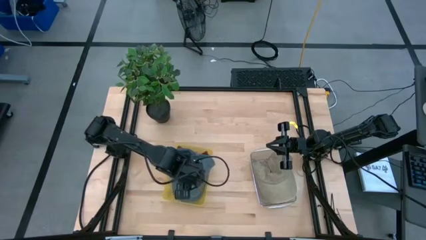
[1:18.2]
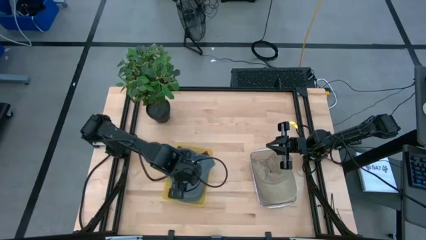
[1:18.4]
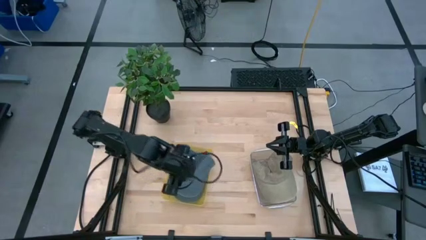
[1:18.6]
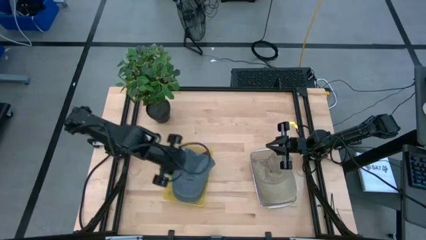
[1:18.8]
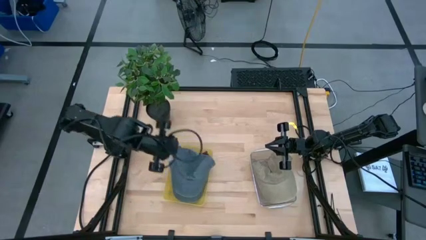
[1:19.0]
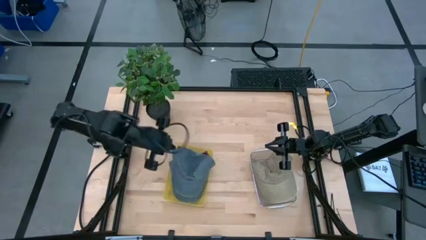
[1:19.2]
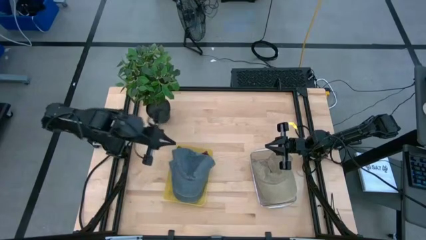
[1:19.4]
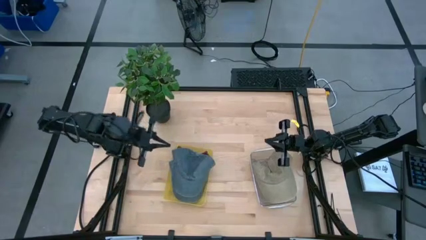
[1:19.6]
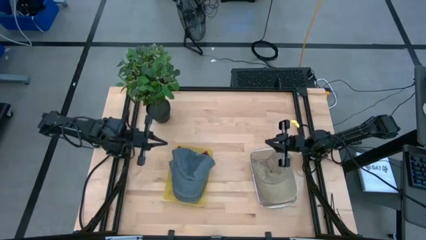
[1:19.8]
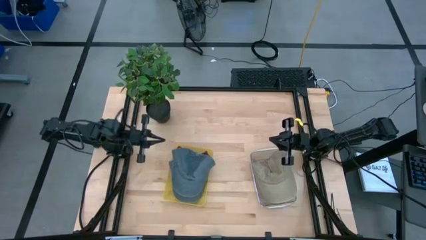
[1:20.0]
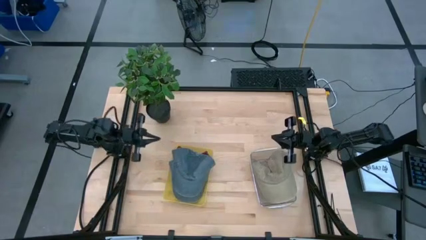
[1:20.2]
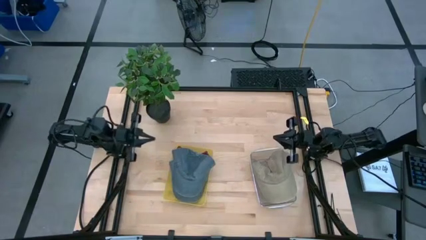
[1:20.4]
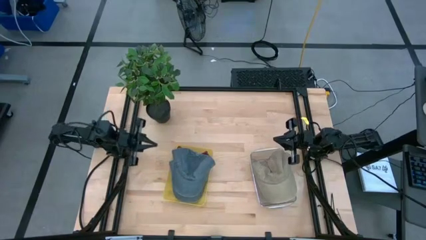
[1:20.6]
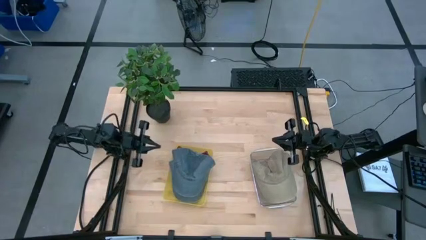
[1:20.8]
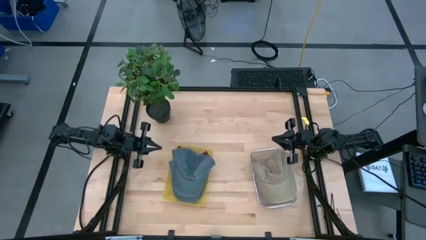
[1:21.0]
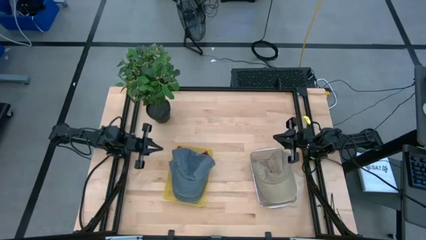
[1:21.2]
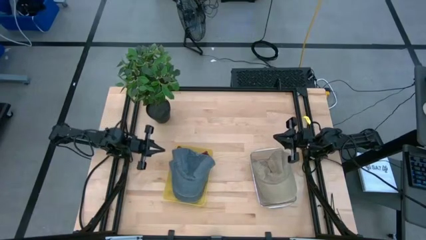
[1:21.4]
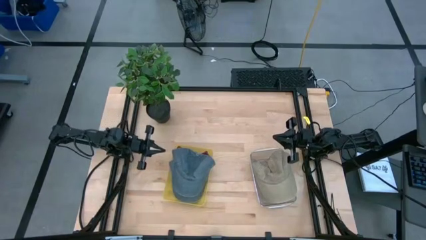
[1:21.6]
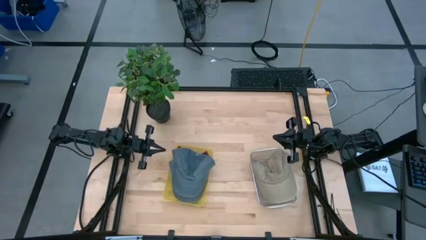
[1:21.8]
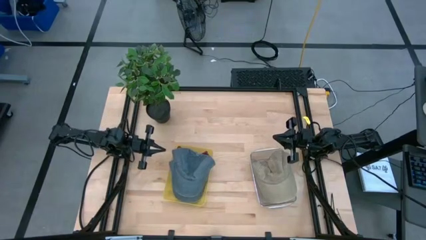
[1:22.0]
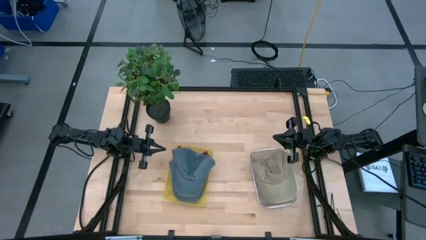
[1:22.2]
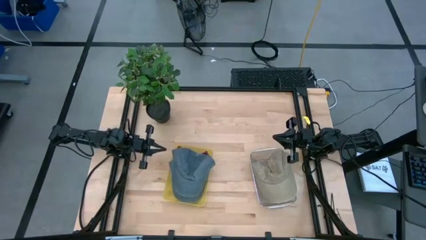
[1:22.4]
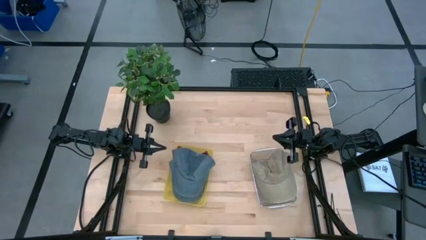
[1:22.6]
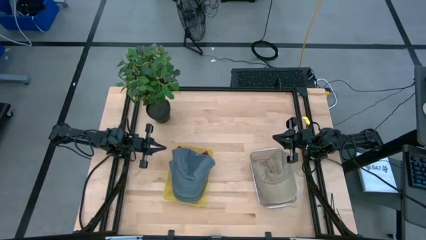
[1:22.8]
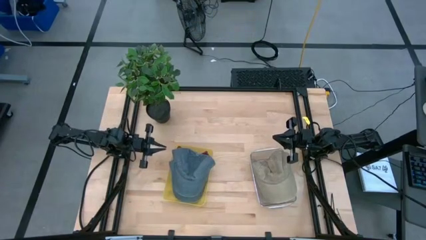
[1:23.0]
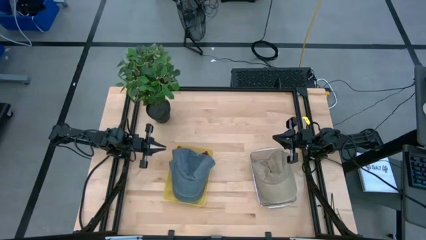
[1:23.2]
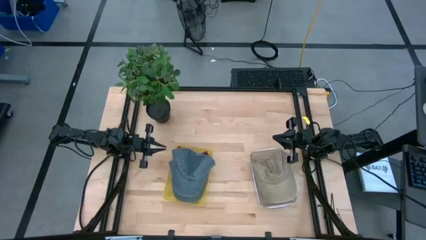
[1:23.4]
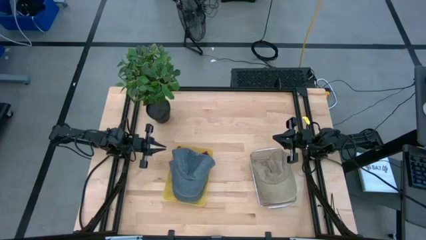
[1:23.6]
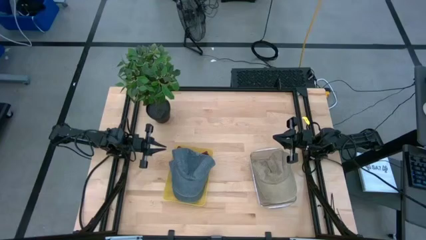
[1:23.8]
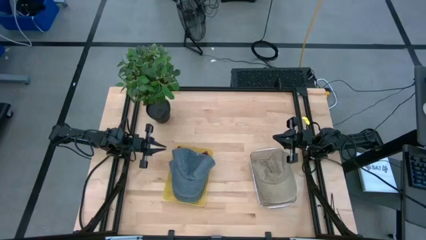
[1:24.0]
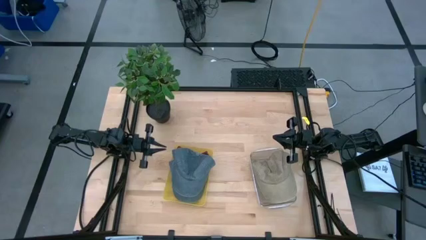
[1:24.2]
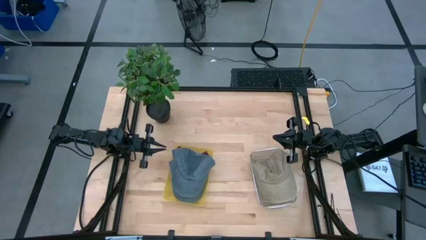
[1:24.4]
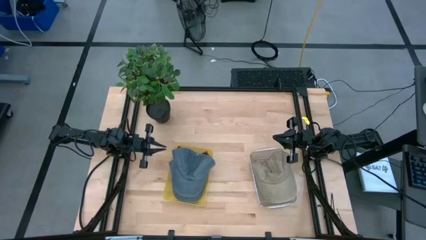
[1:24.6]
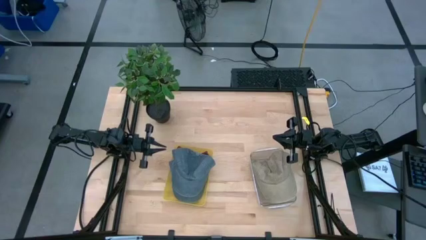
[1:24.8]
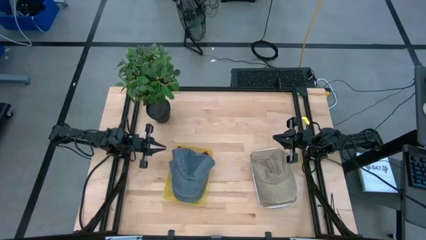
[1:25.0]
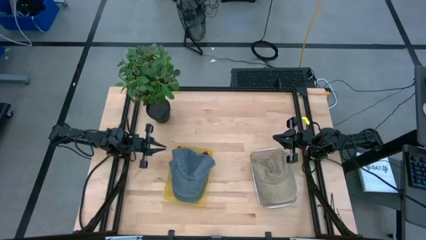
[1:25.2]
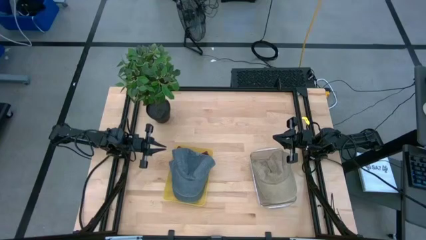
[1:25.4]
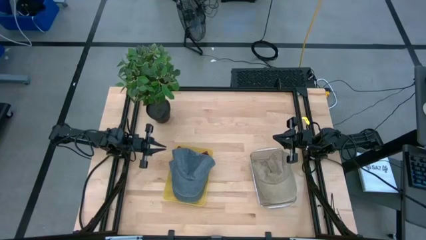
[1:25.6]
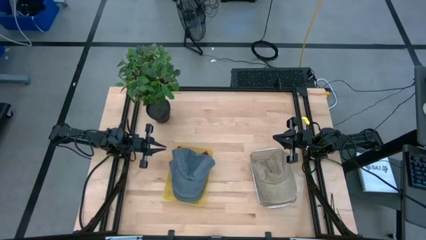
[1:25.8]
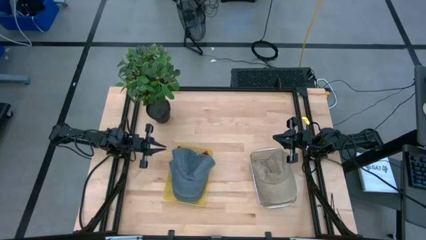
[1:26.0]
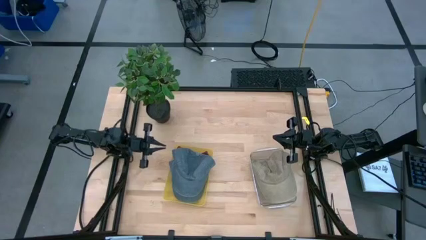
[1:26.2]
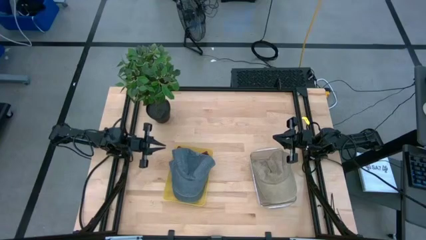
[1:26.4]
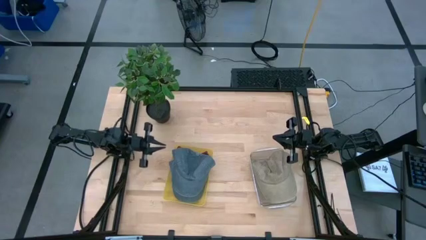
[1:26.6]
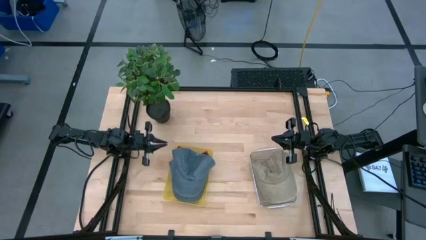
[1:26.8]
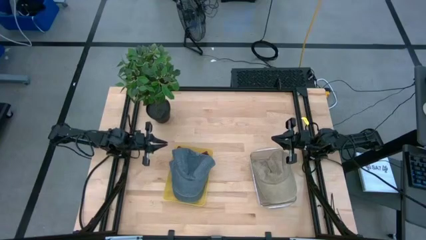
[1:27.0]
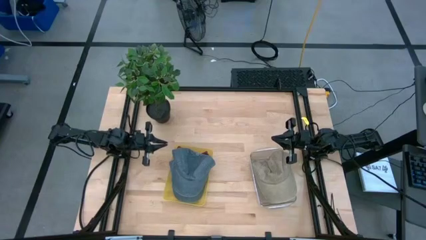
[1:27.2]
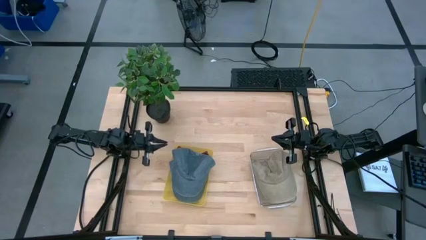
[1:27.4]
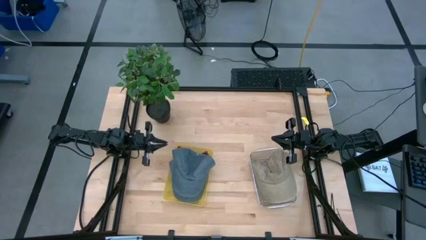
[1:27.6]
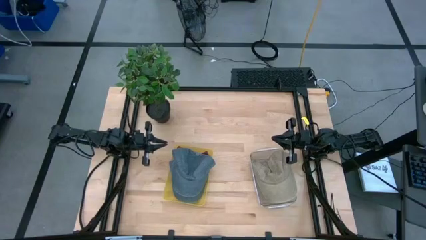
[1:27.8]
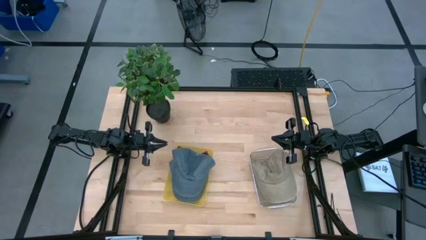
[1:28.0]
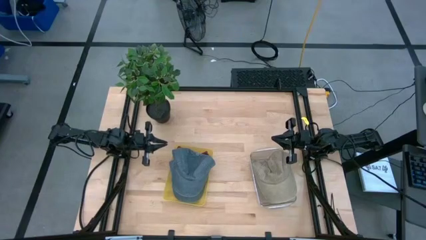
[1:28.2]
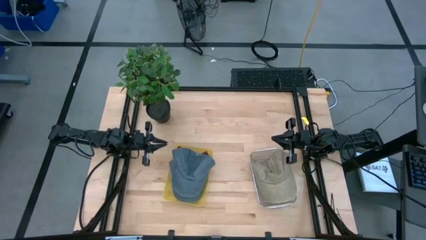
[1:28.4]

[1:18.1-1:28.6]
Task: Pick & Place hat
Return to Home Position
